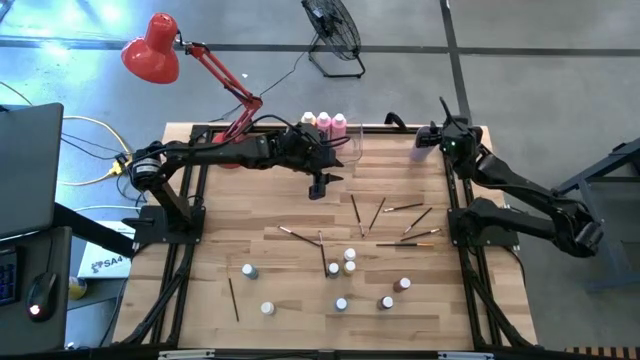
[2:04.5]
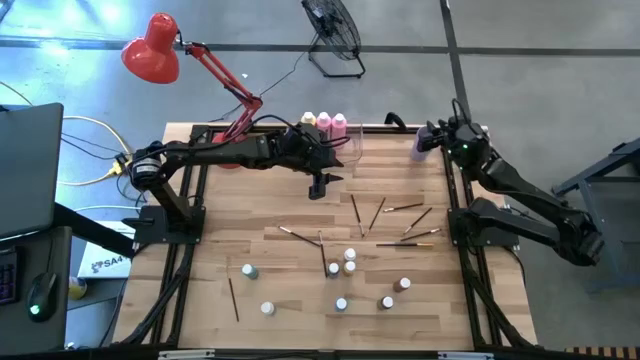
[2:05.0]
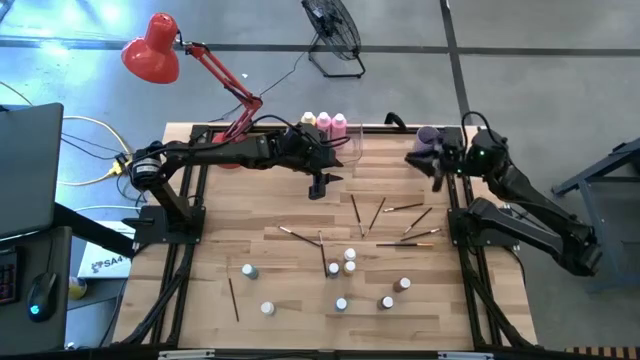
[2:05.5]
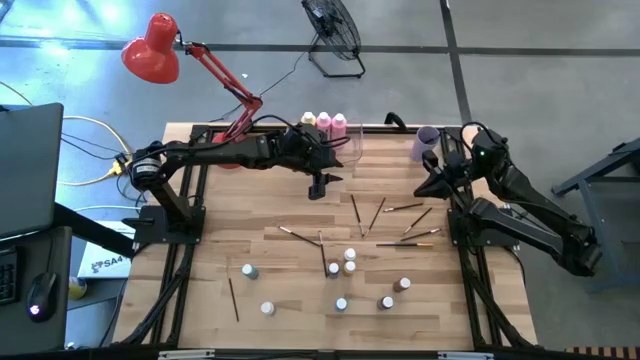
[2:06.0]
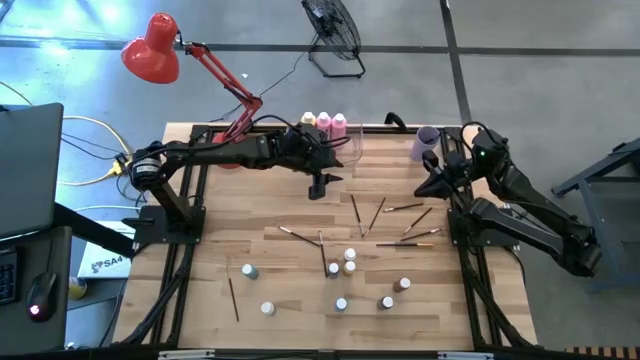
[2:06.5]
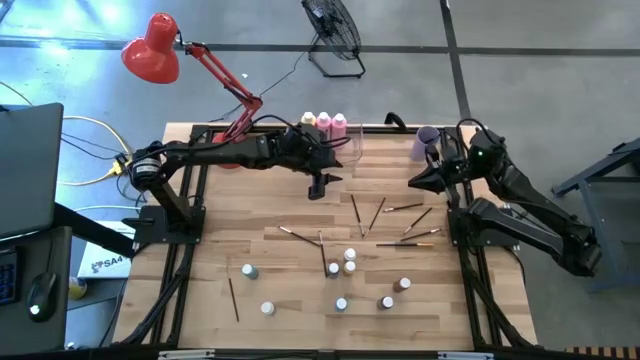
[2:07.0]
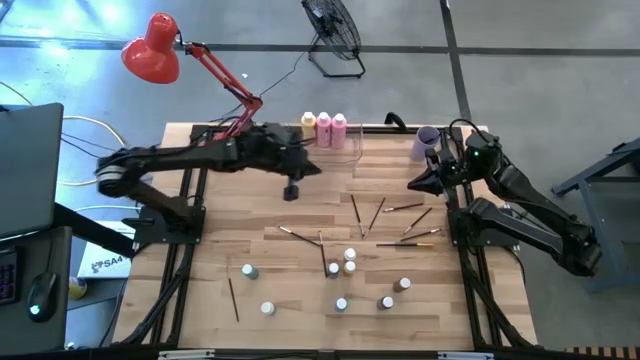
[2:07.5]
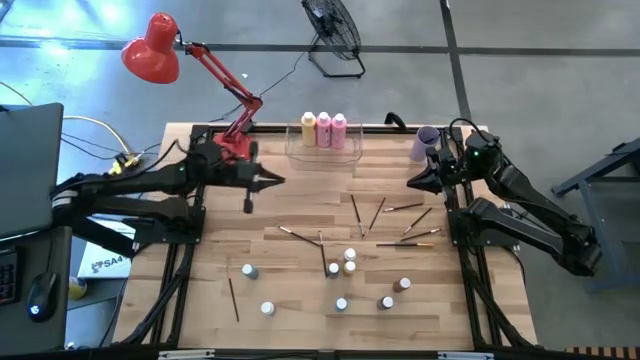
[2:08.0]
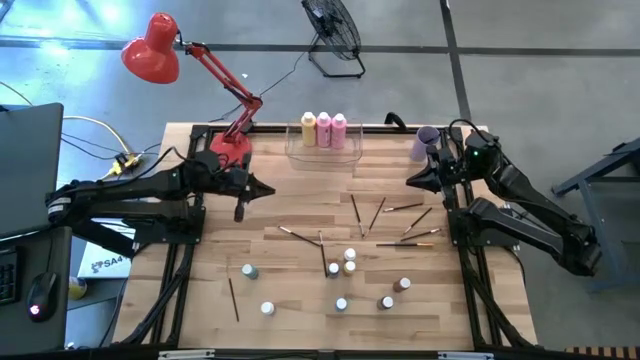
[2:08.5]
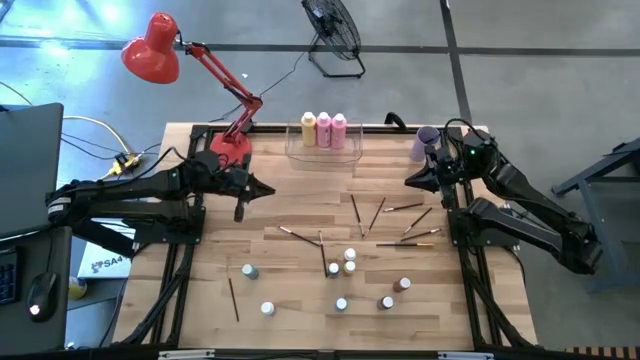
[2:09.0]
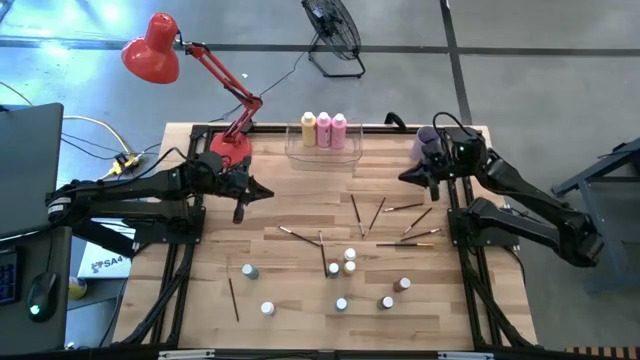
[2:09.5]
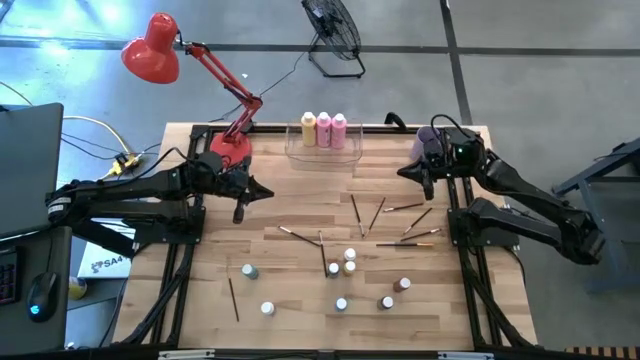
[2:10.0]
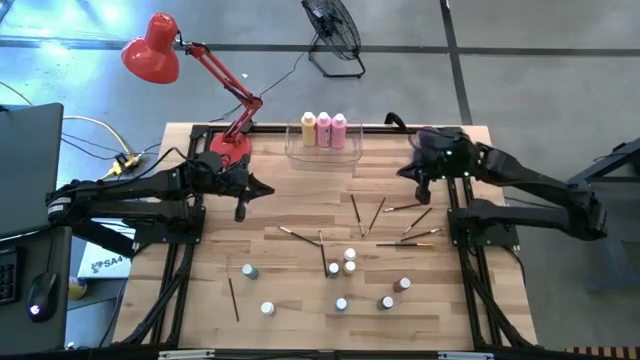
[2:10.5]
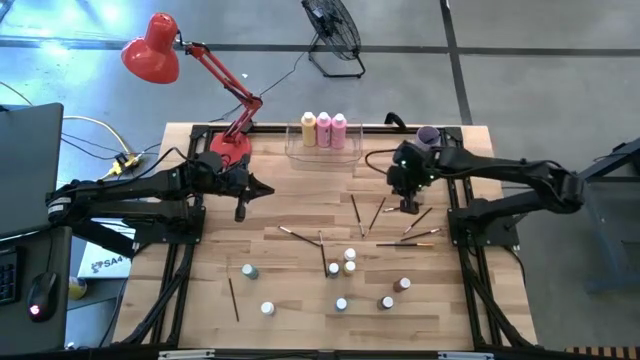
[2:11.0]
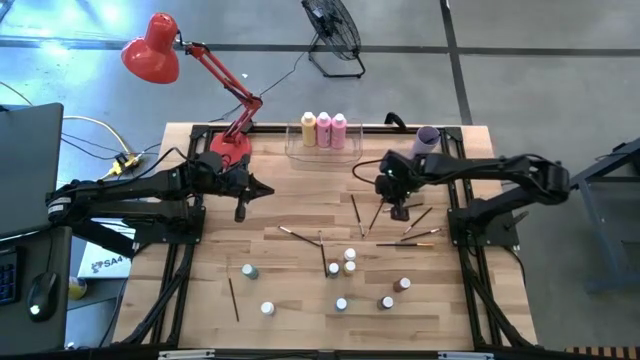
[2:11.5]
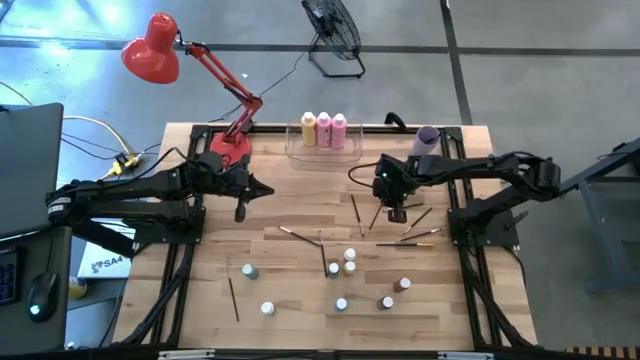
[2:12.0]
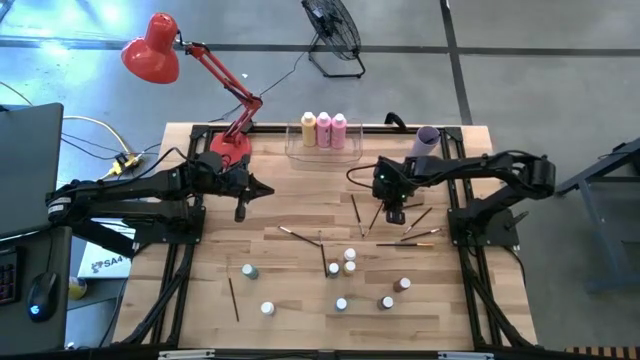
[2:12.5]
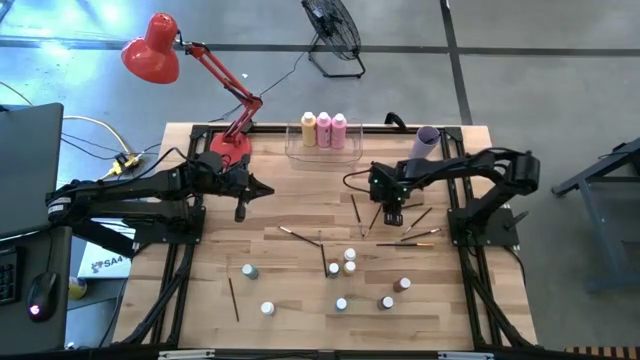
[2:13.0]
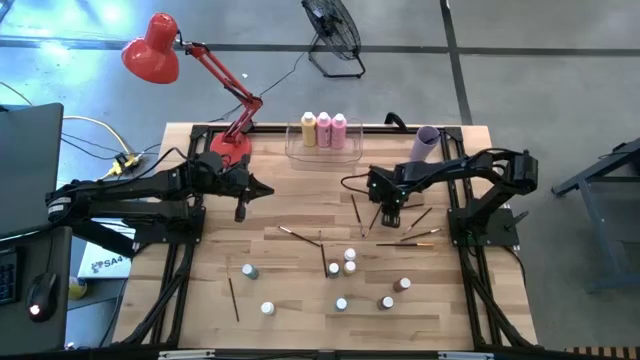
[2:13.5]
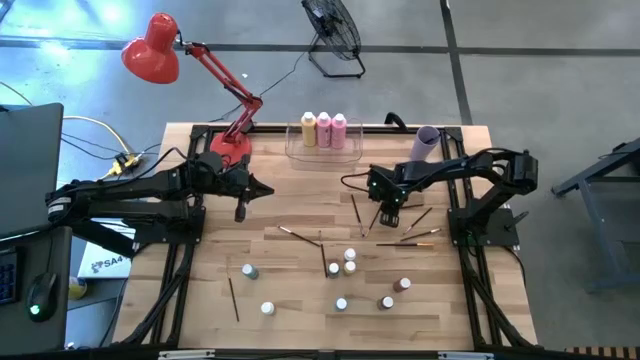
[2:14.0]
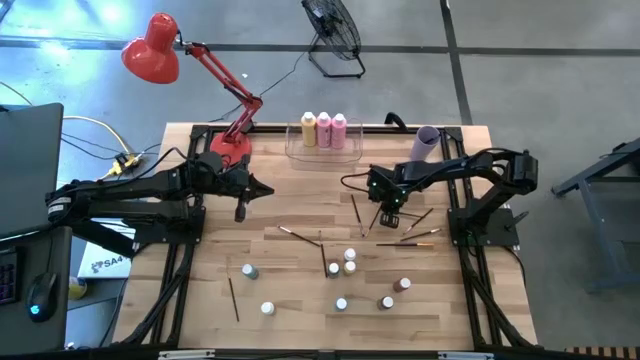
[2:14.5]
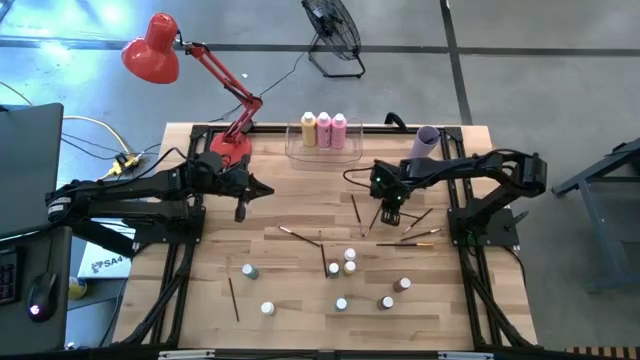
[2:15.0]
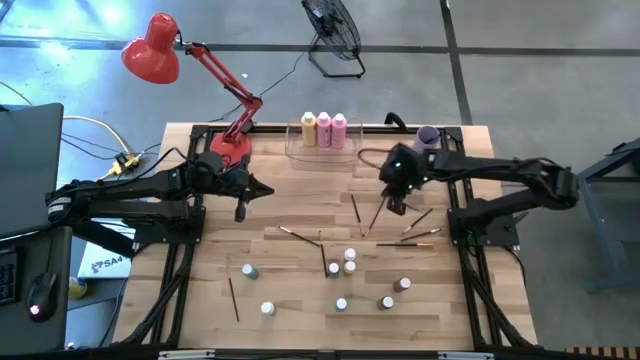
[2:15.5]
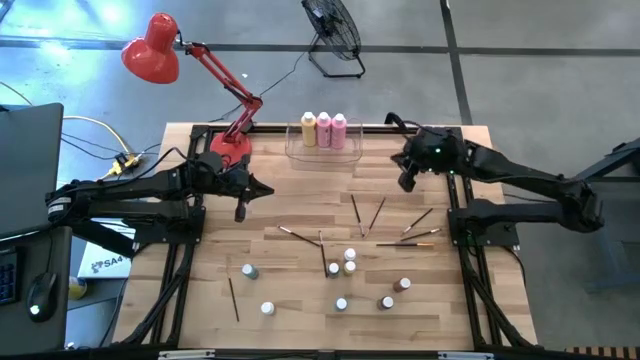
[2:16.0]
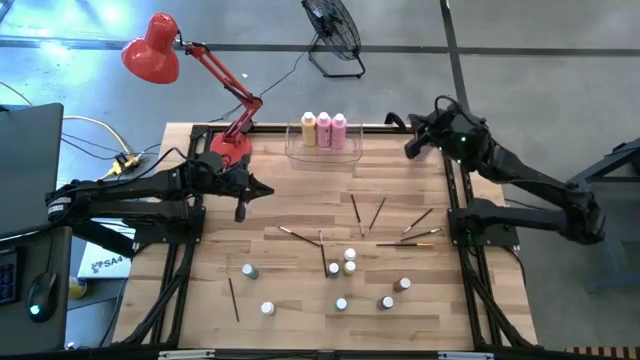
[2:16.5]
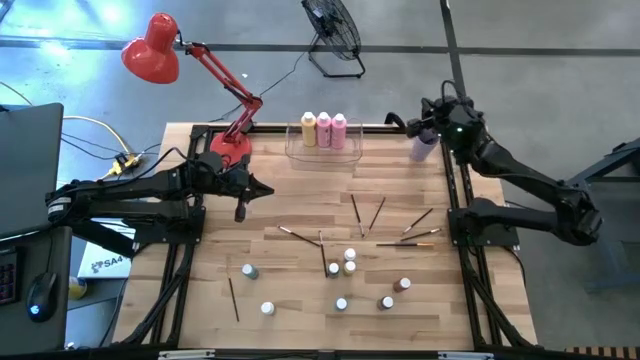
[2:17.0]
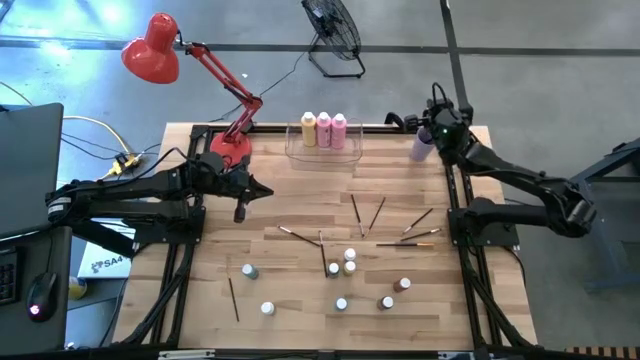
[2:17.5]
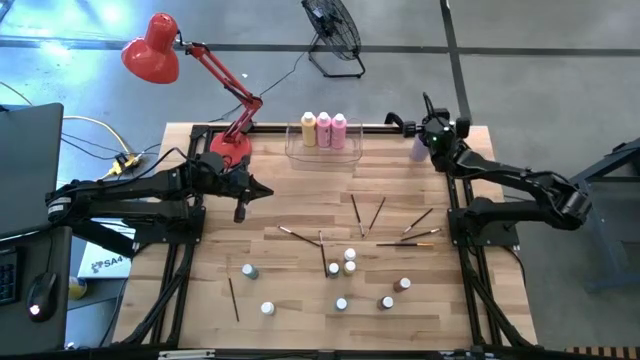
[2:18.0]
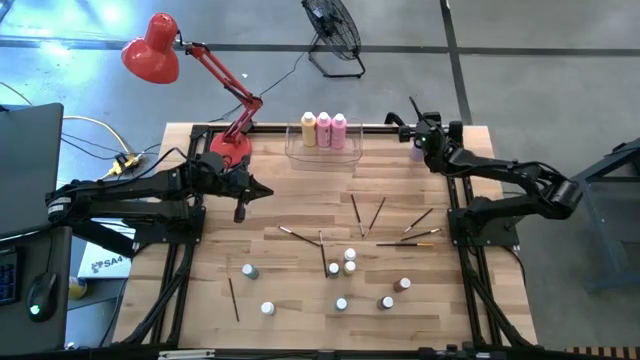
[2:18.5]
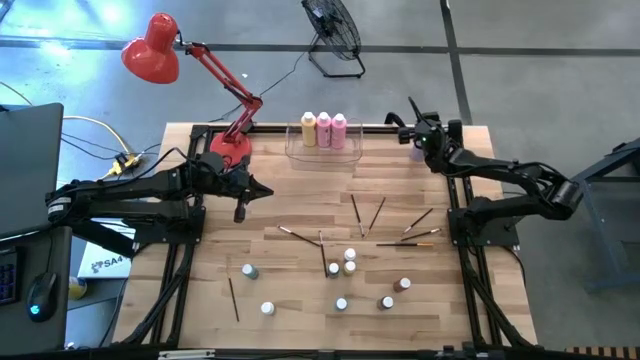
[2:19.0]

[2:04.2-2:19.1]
Task: Pick & Place Paint Supplies
Put the black paint brush into the violet cup

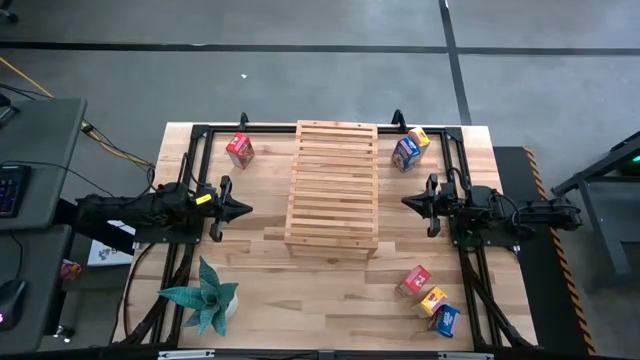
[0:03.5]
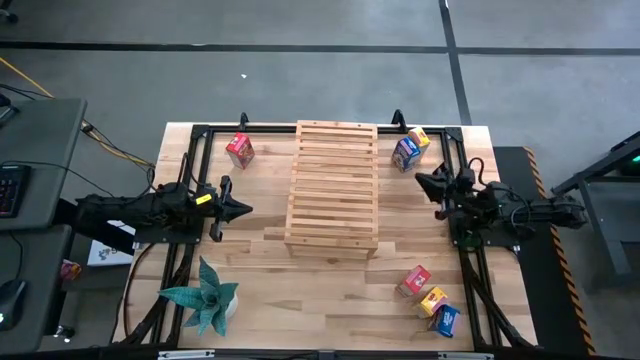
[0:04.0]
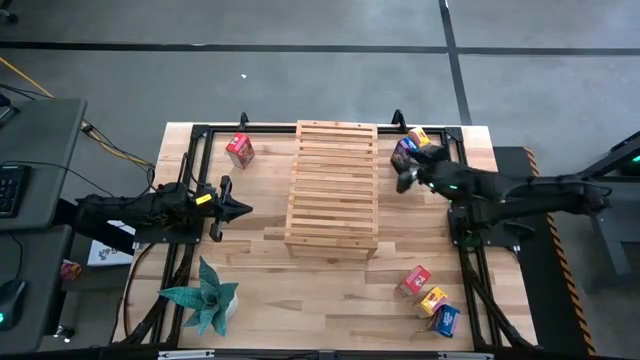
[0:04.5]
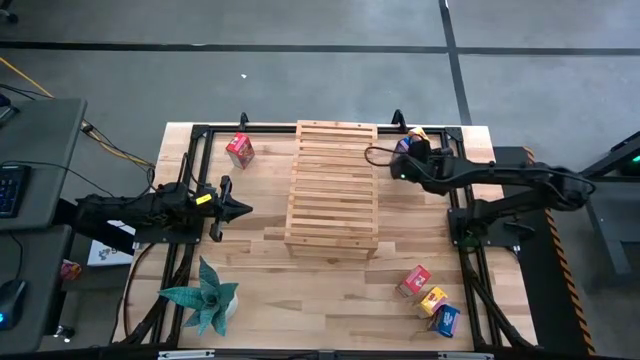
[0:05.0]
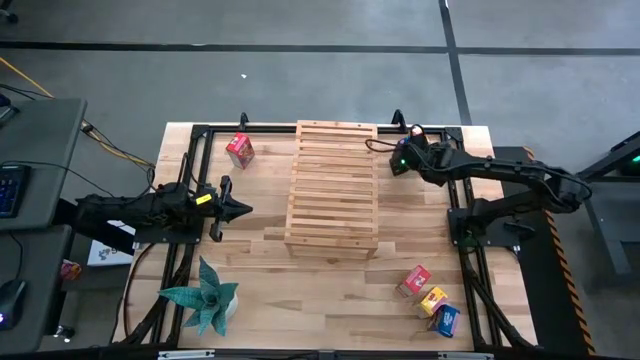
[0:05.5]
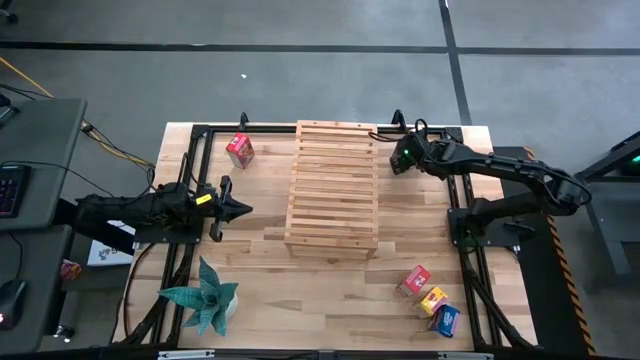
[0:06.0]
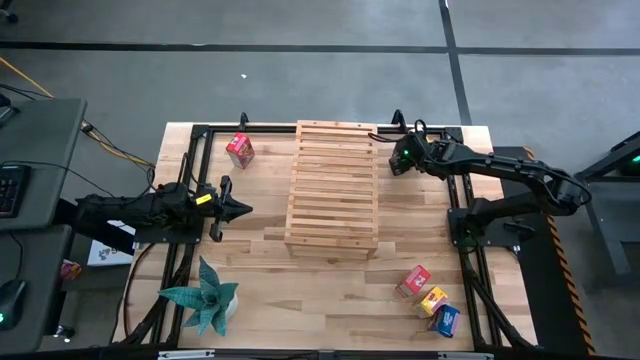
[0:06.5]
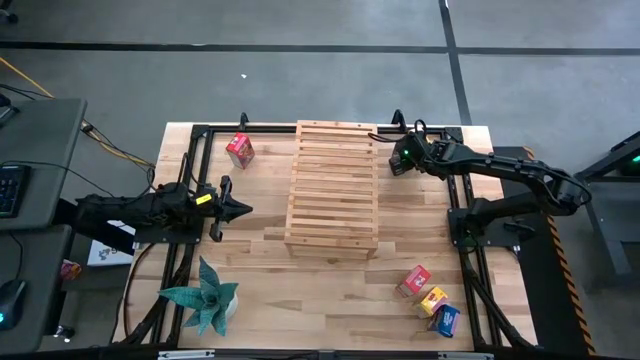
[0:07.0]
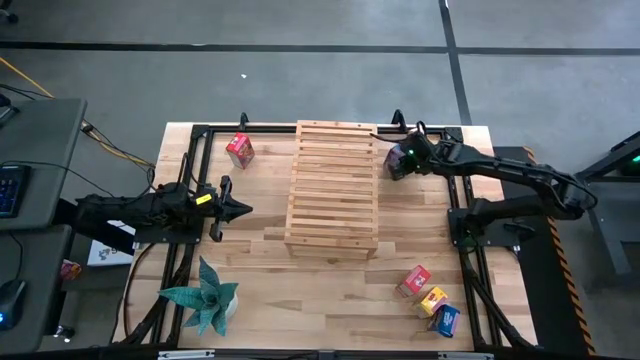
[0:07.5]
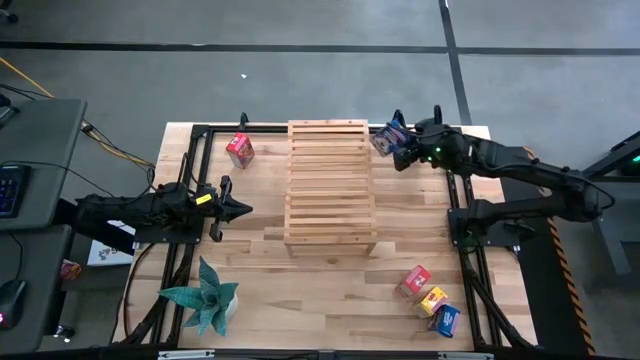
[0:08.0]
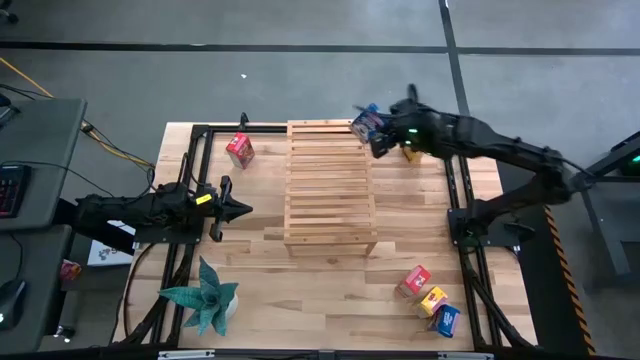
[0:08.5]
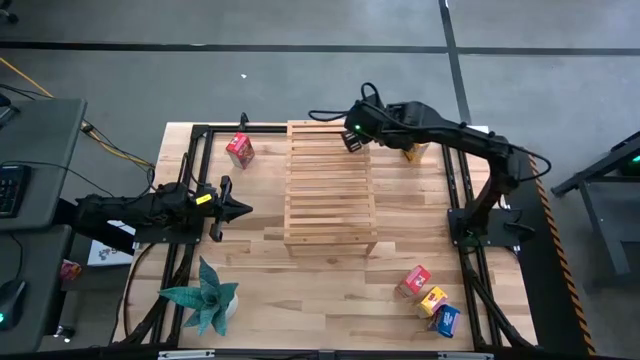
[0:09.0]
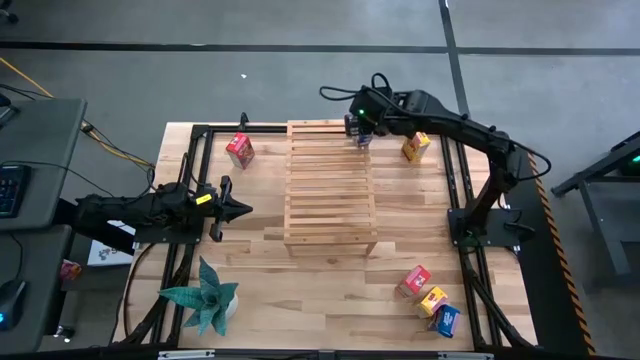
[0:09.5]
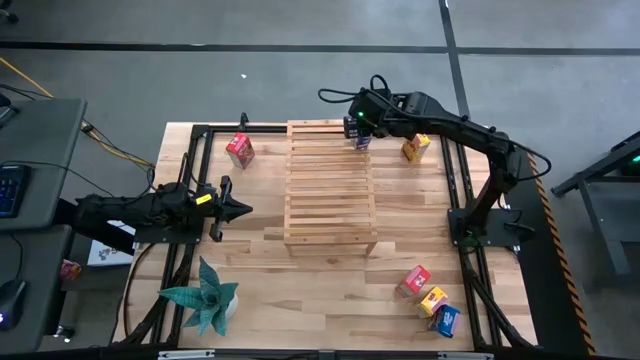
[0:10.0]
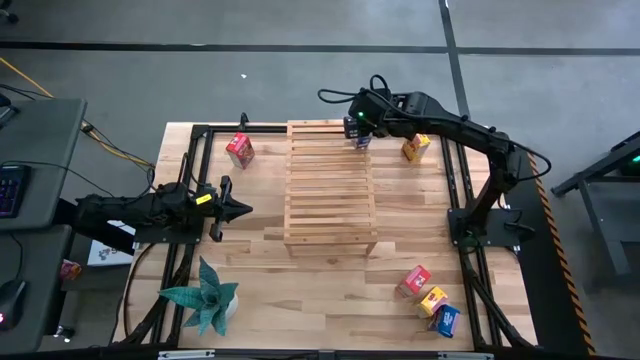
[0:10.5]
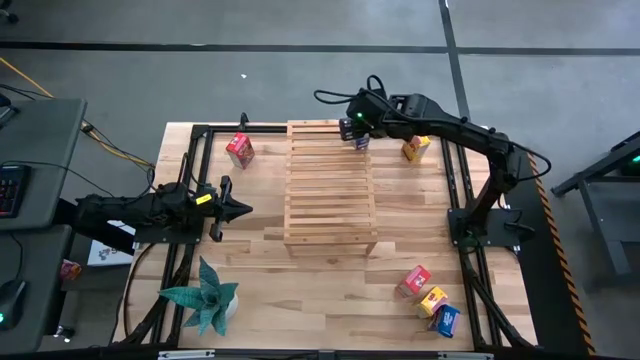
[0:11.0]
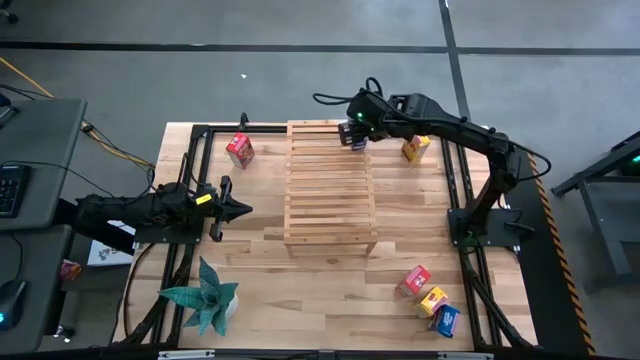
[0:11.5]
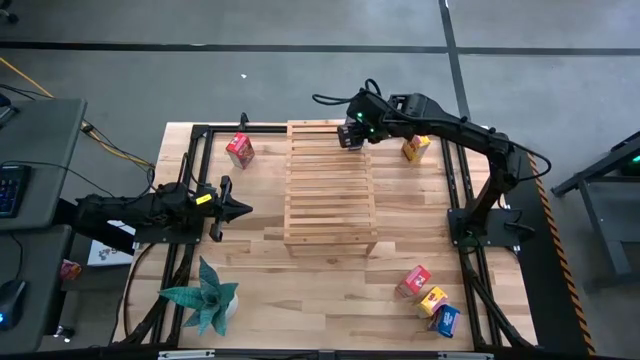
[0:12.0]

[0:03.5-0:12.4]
Task: Stack cereal on shelf
Put the top blue cereal box on the shelf
